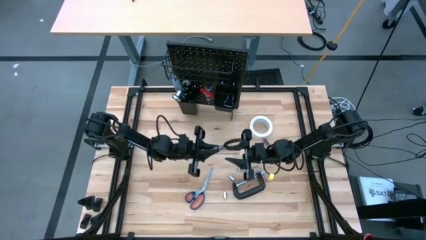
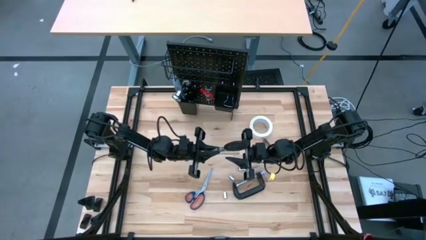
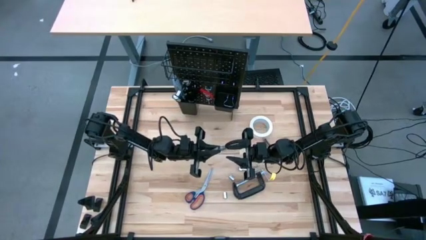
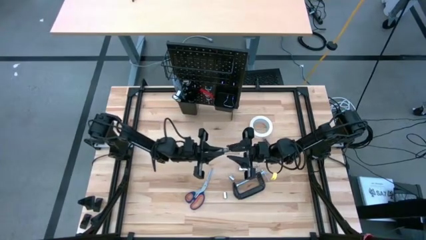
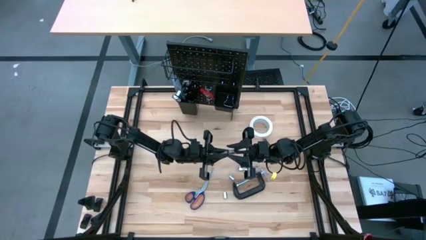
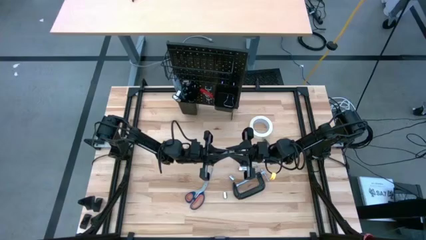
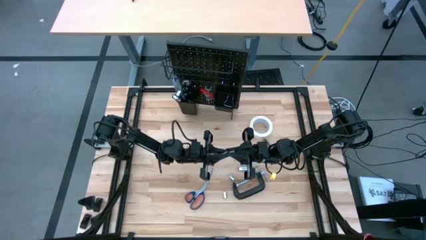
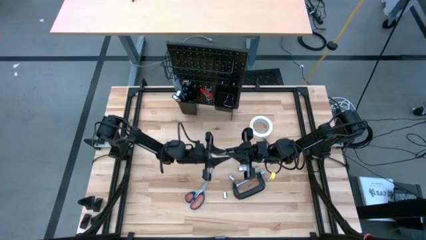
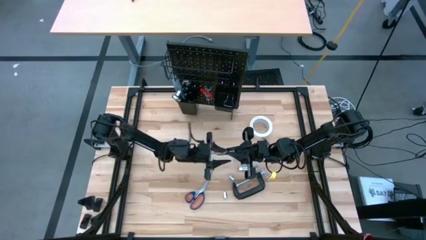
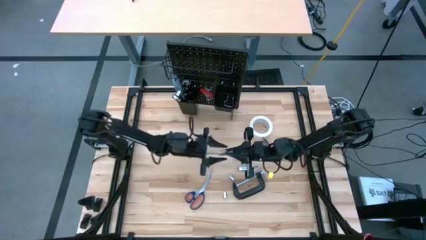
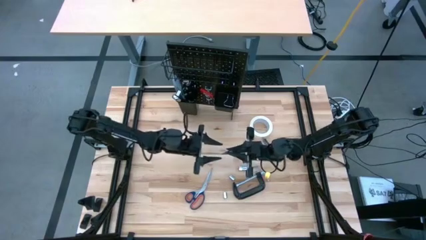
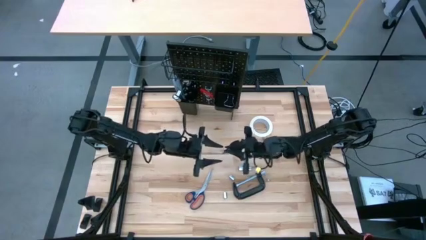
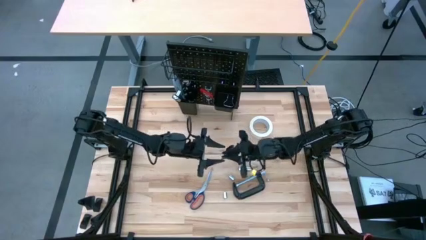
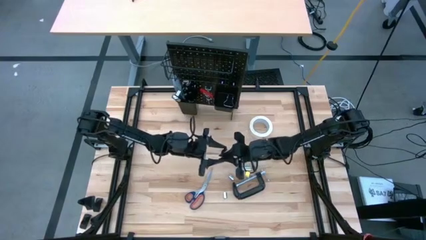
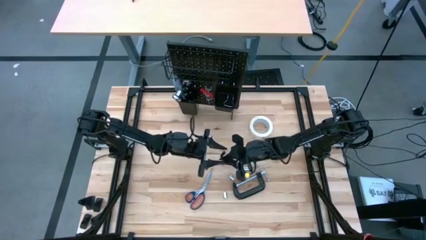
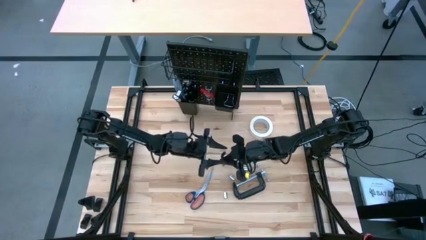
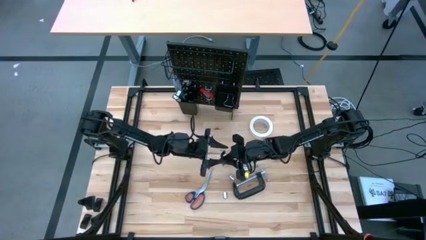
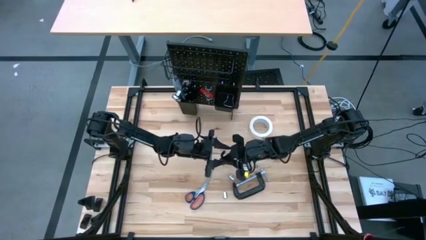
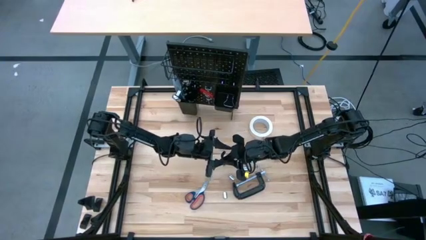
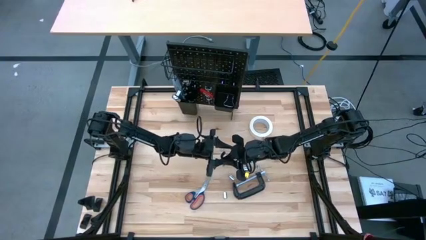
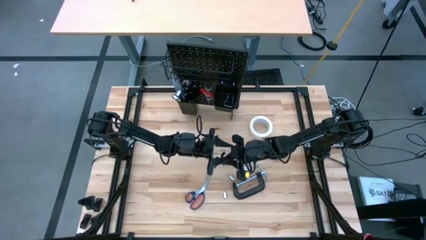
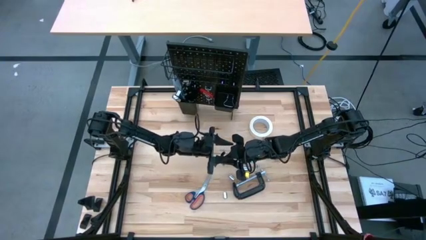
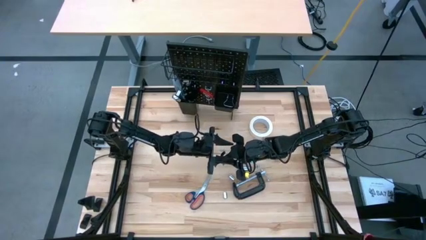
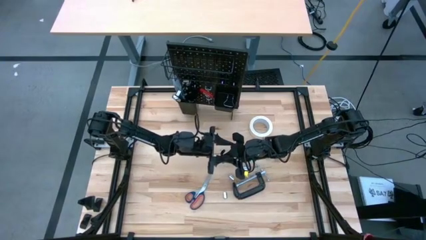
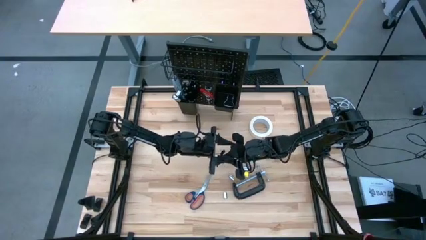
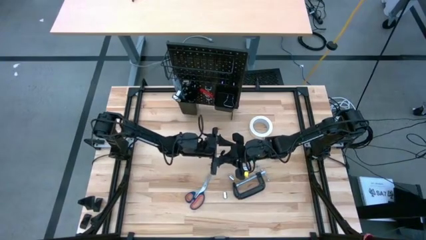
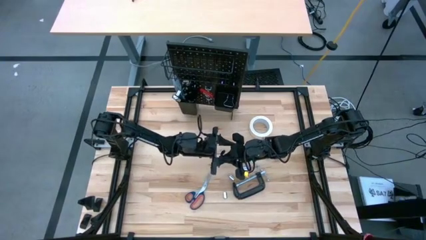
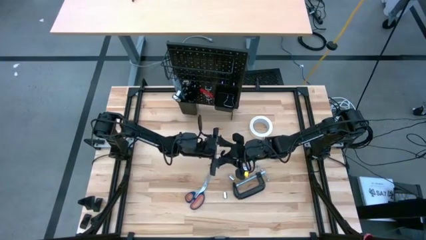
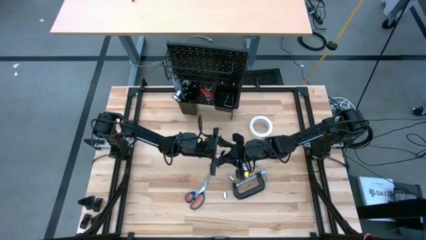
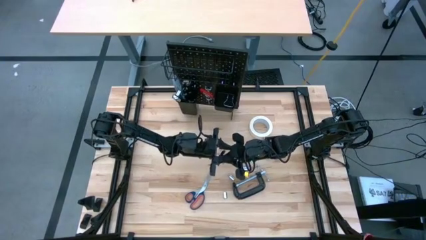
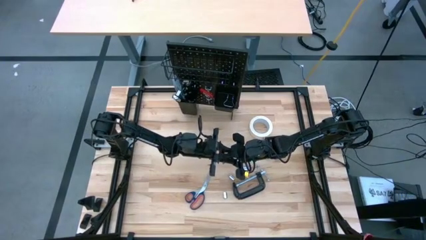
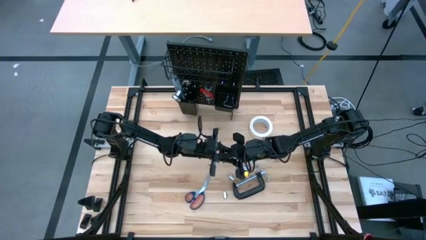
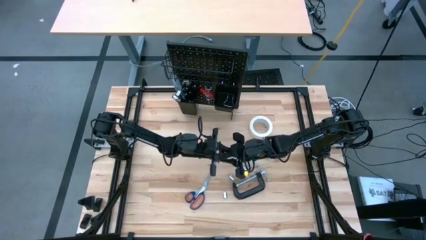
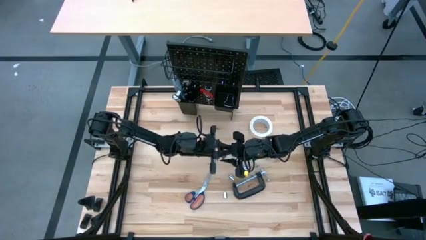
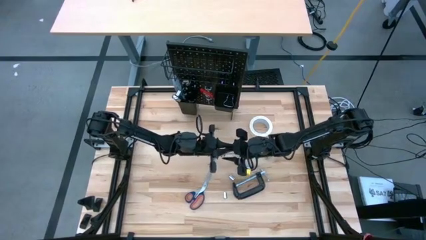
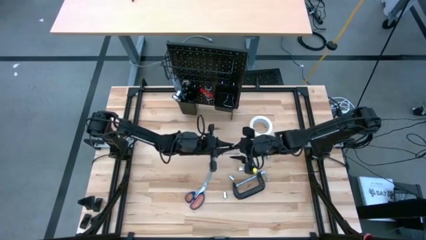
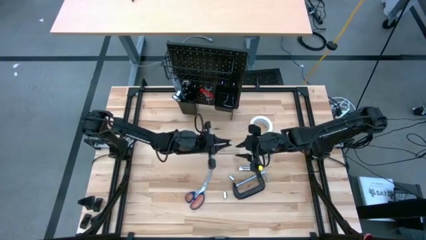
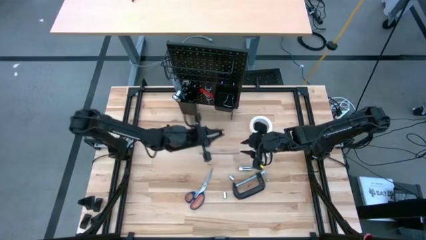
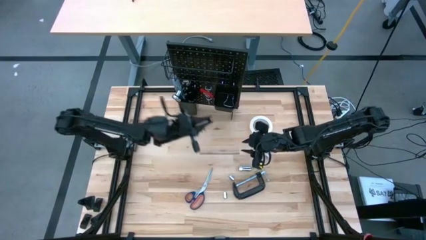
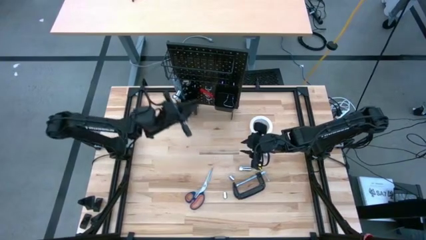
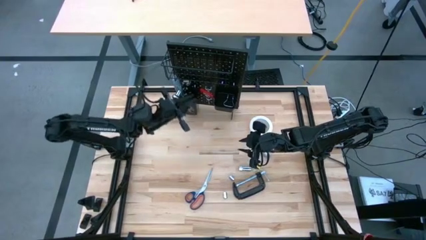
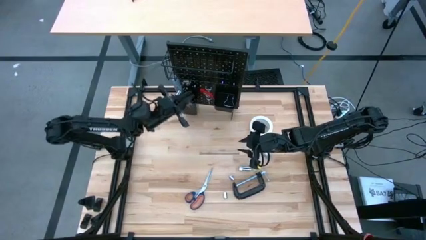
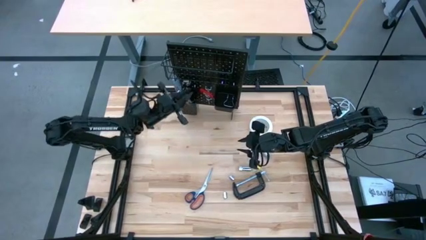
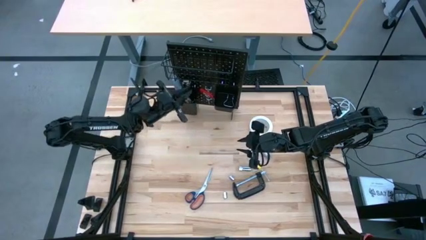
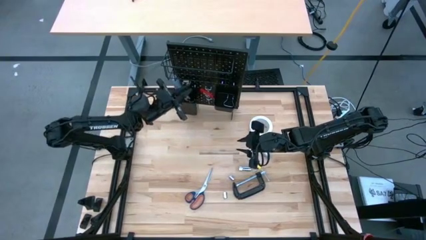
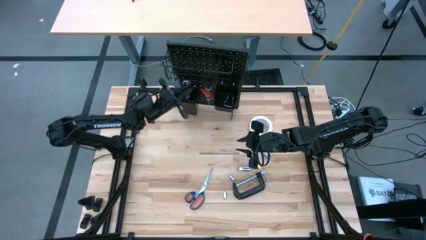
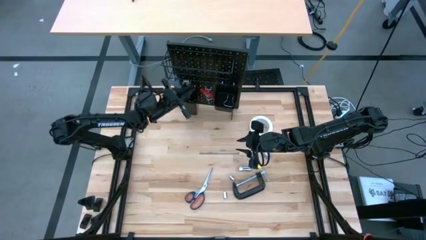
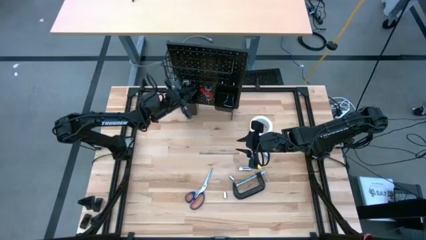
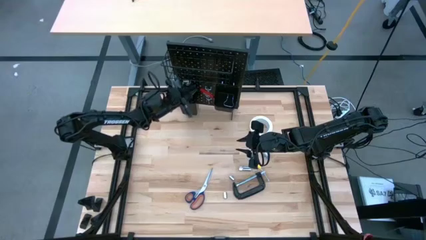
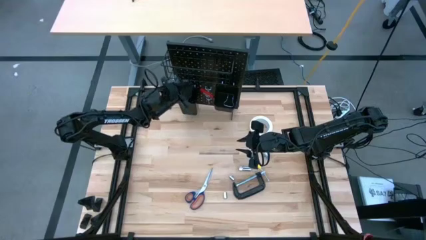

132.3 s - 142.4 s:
Task: Hang tools onto peg board
Put the black long nose pliers into the left black bin on the peg board
